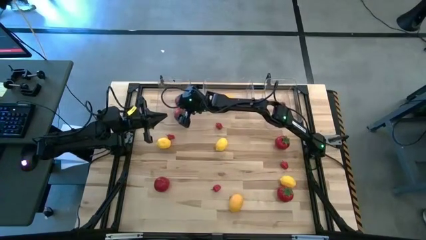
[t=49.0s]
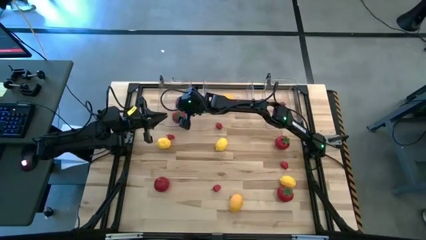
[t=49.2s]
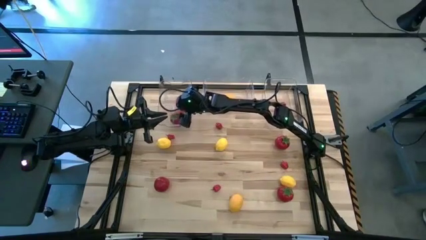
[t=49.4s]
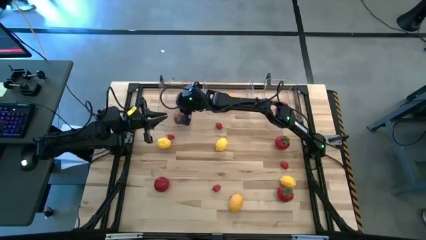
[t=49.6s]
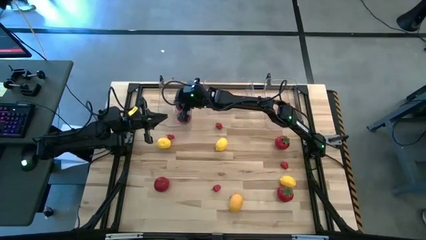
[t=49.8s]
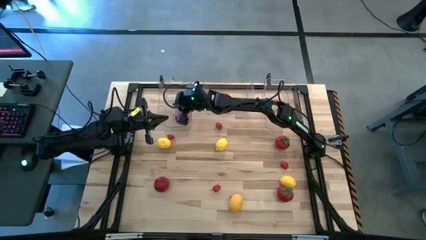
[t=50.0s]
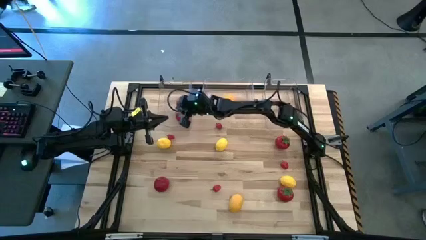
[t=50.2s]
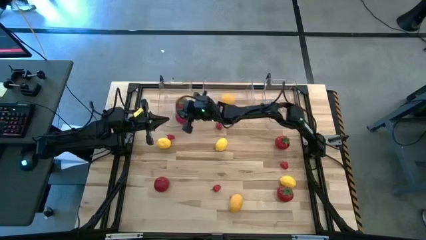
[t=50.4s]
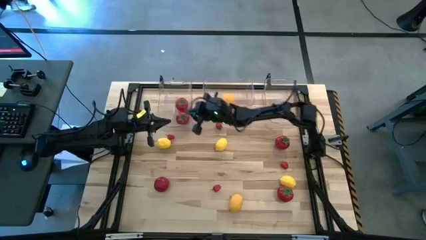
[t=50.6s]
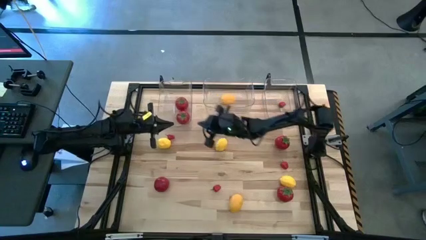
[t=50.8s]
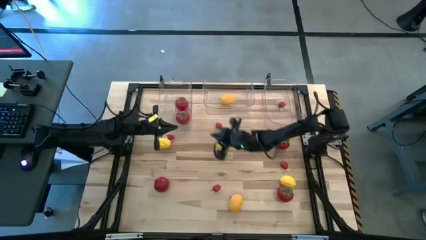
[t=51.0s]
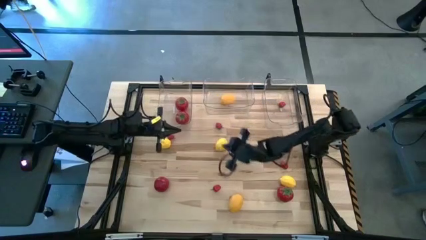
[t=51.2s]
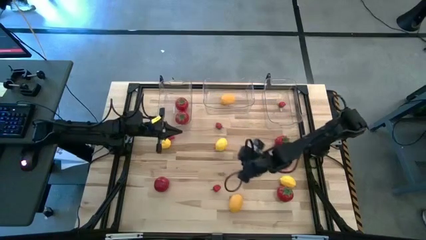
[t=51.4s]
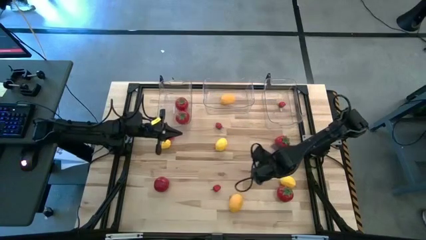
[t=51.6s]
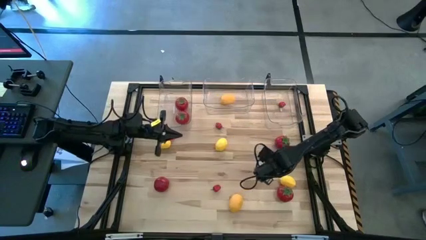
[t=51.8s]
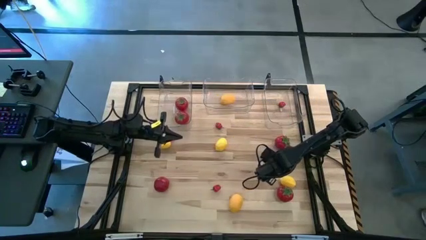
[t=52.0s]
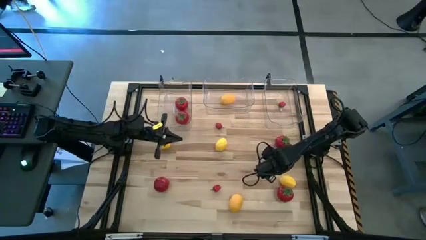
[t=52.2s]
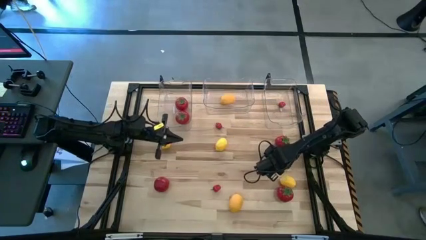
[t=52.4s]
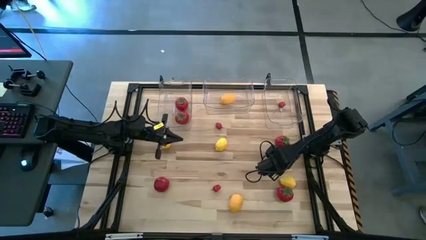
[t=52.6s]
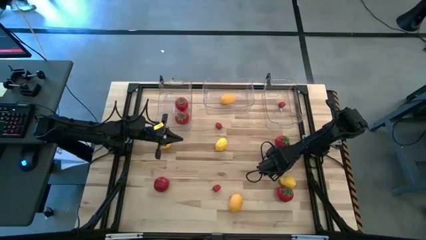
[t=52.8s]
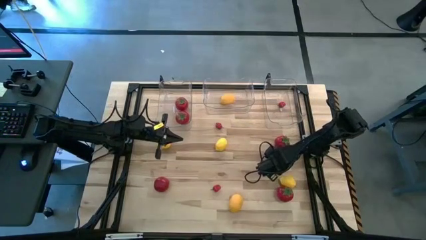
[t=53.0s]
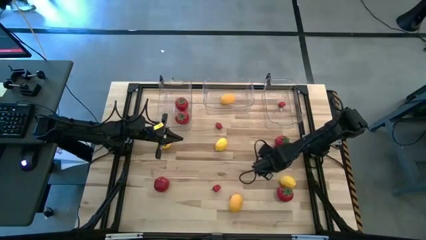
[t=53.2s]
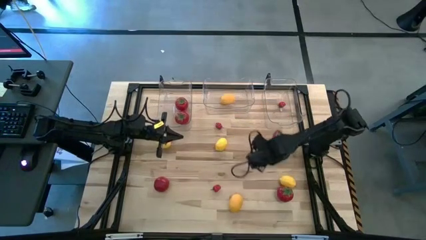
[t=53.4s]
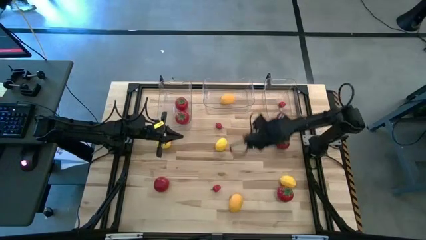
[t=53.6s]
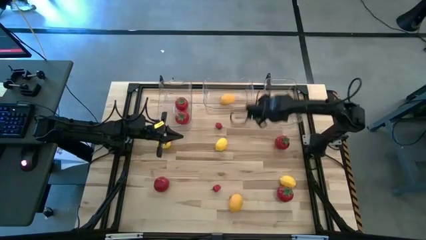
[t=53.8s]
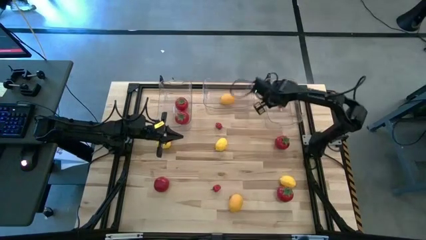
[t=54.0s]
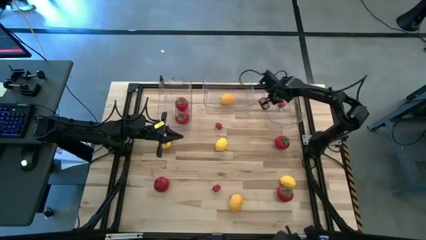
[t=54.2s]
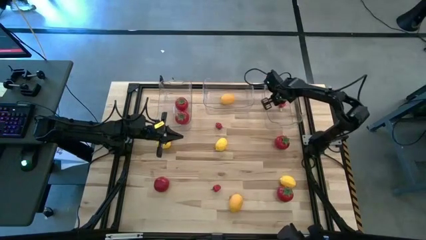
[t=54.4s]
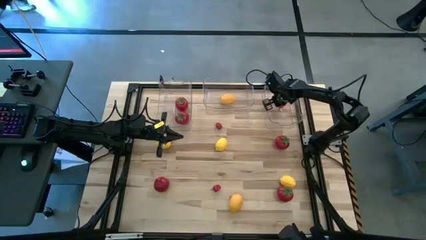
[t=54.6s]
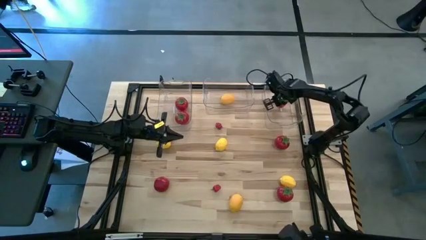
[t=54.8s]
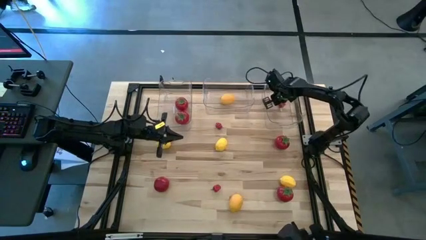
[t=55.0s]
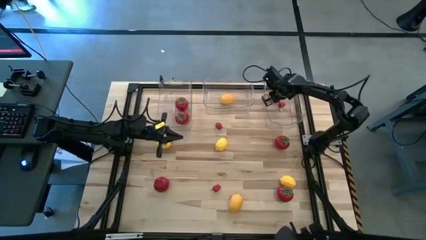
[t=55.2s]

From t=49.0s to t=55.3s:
Task: Sort produce into baskets
Put the red chili into the right transparent bin

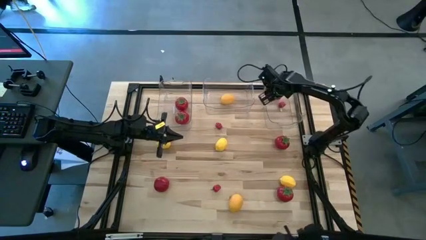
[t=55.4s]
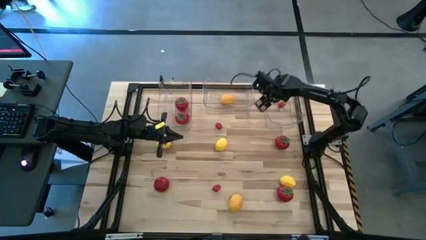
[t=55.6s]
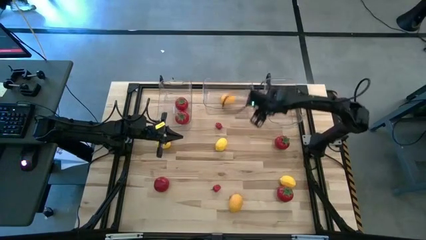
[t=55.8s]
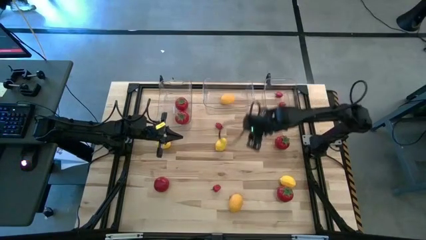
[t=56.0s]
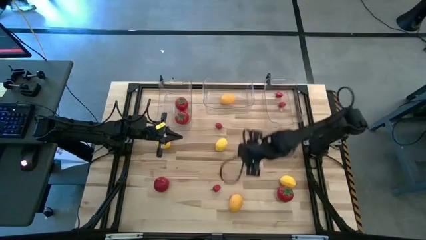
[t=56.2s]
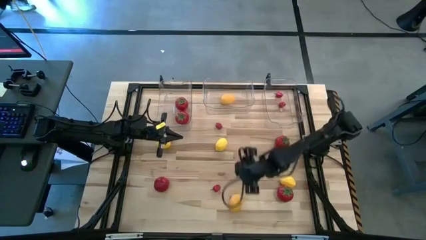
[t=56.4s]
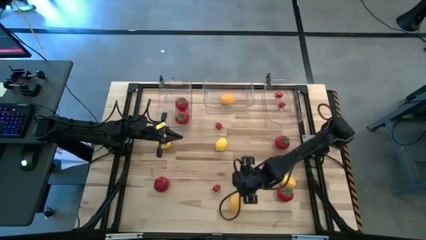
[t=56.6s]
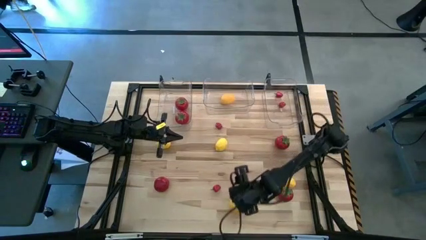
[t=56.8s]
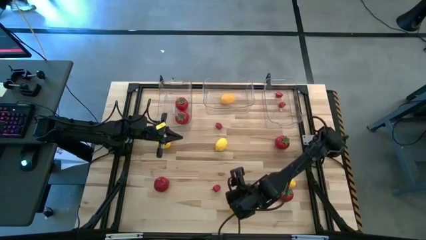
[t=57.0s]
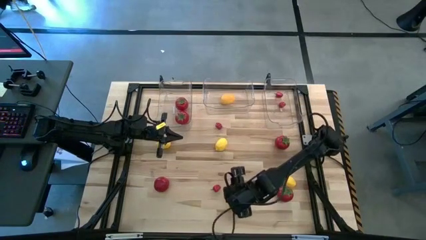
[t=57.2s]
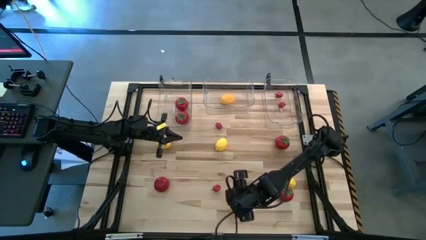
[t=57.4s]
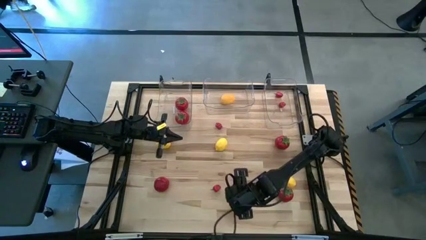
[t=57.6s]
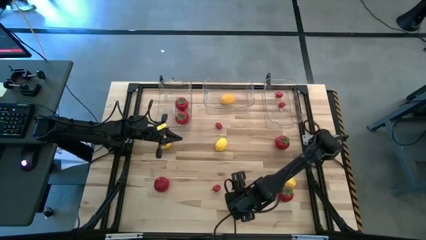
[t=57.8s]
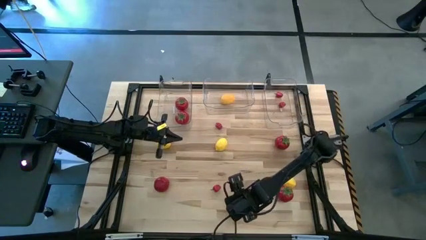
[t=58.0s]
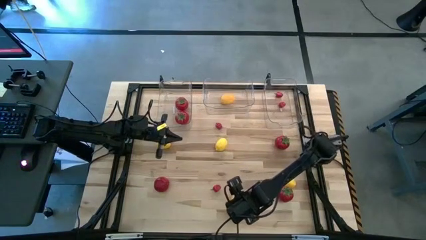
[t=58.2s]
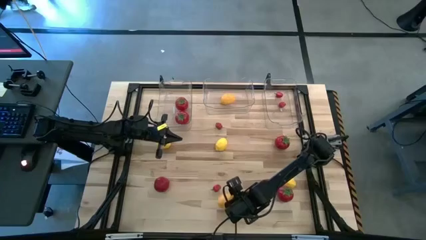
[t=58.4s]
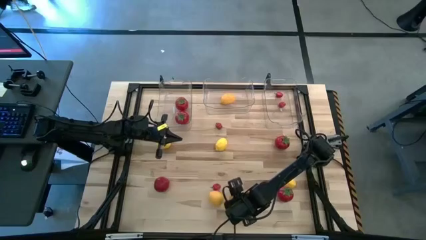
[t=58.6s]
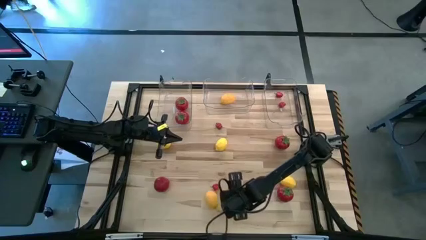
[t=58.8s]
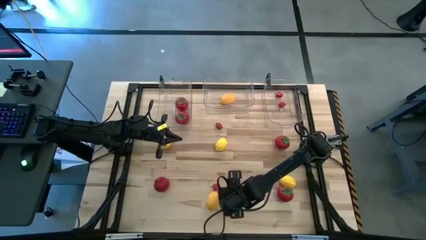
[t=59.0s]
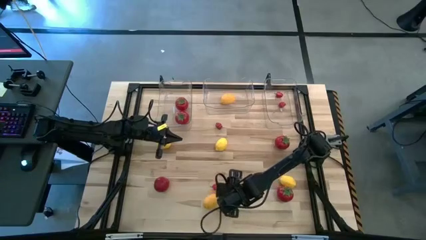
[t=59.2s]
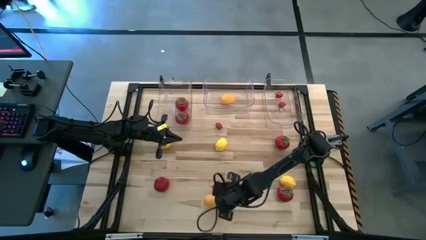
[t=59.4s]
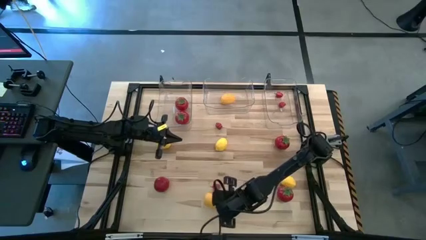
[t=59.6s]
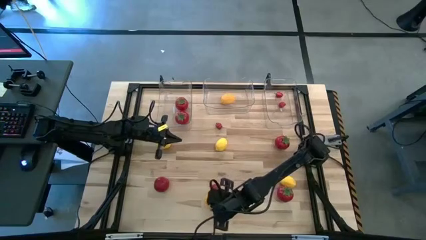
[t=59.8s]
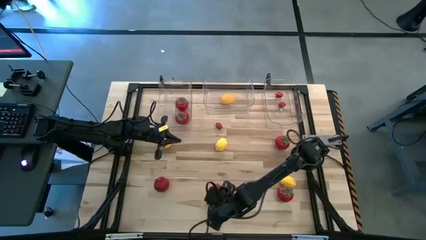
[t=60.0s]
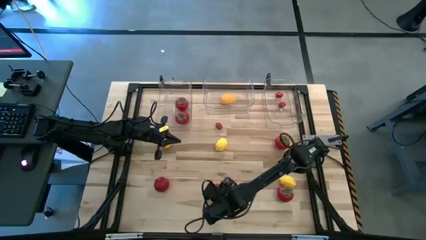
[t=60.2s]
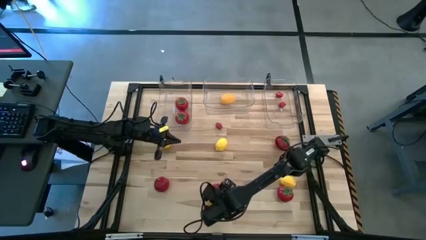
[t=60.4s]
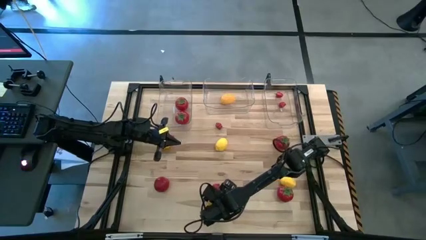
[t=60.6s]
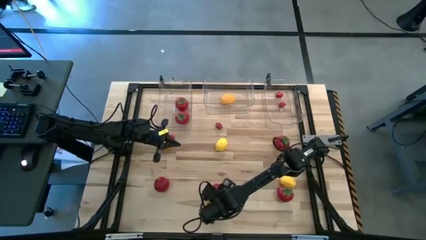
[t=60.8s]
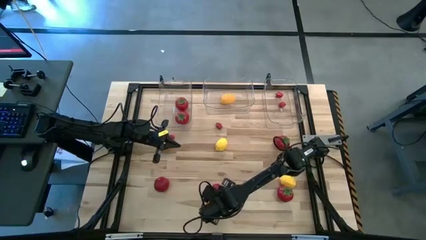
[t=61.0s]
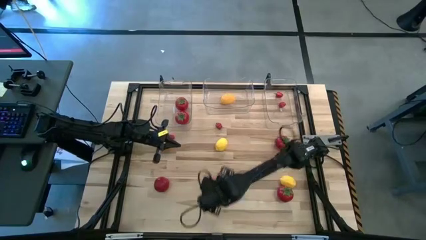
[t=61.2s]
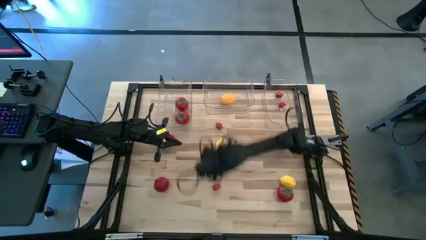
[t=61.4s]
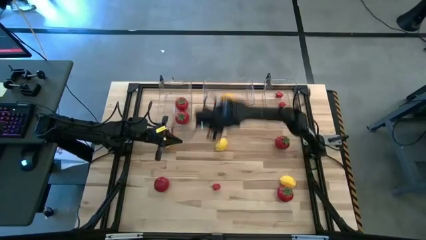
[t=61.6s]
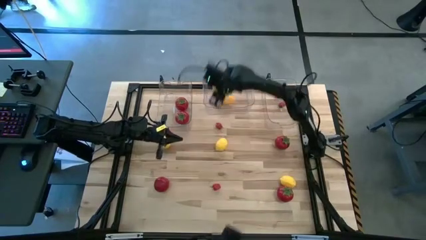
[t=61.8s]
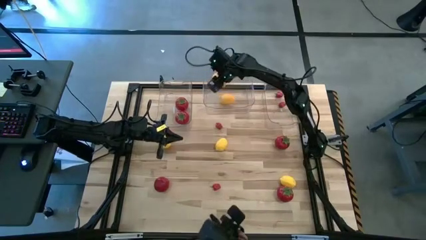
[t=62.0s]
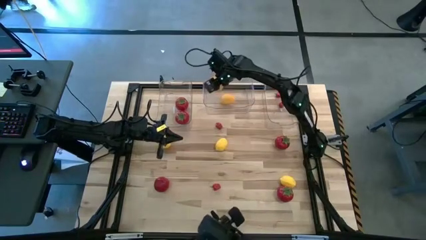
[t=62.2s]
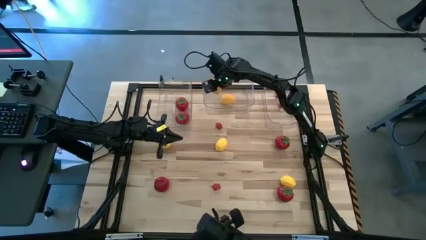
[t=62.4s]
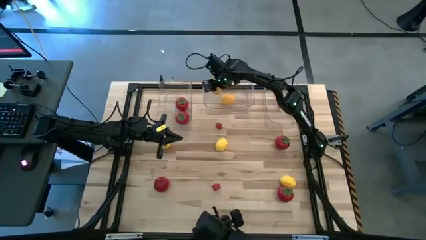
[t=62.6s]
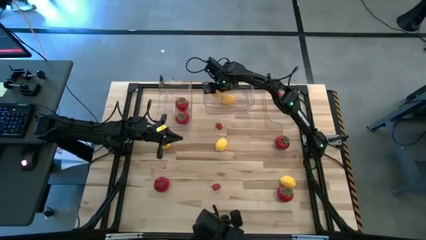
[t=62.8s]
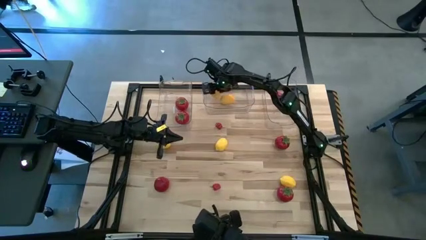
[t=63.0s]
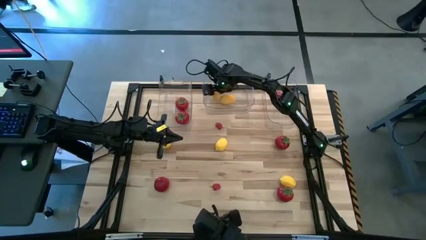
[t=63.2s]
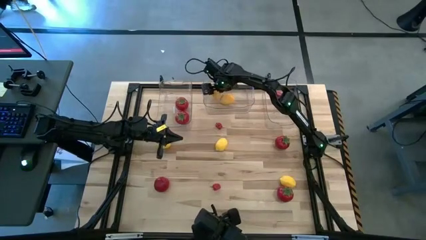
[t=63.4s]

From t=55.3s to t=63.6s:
Put the yellow lemon into the center transparent bin
